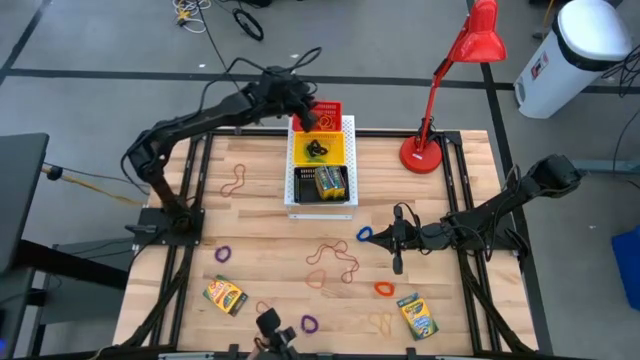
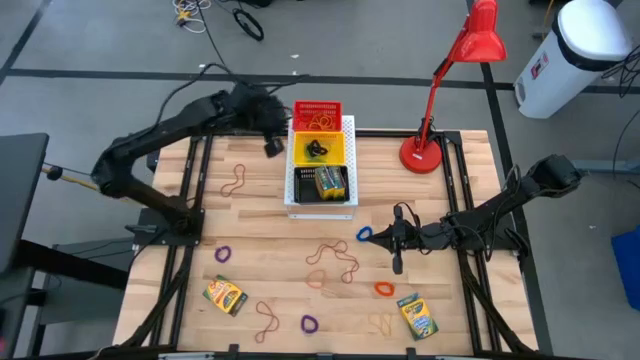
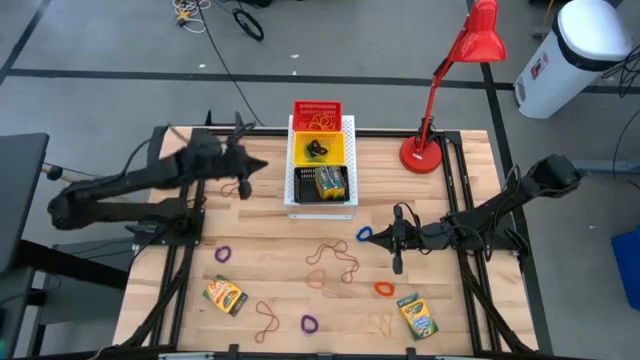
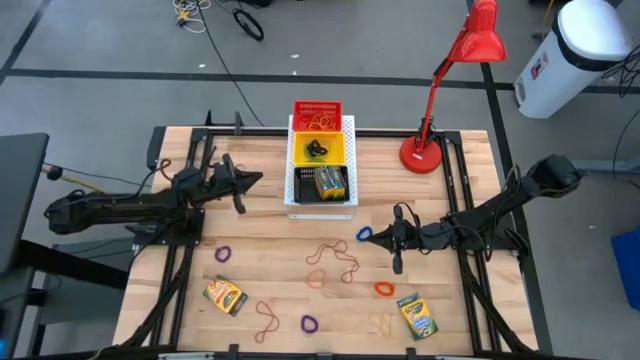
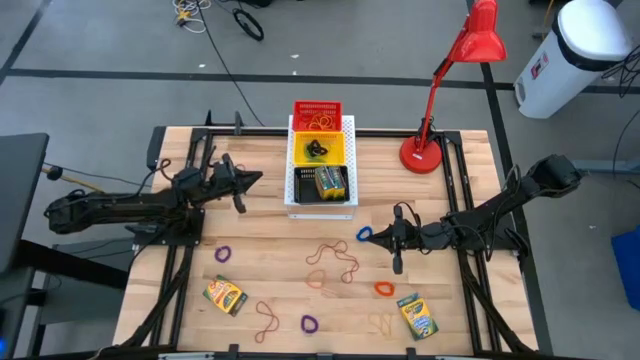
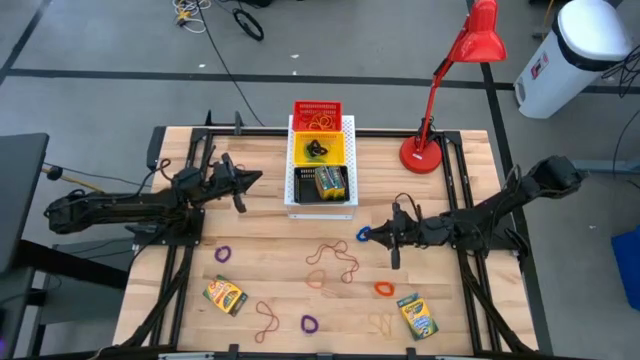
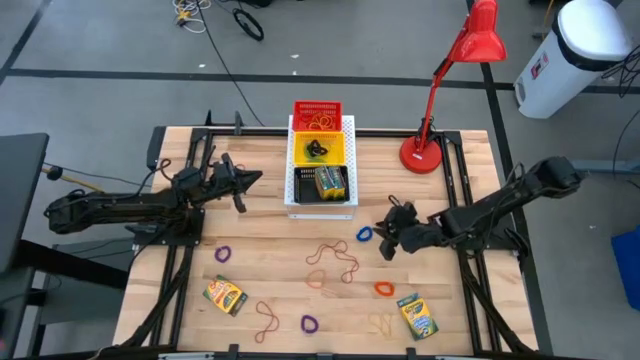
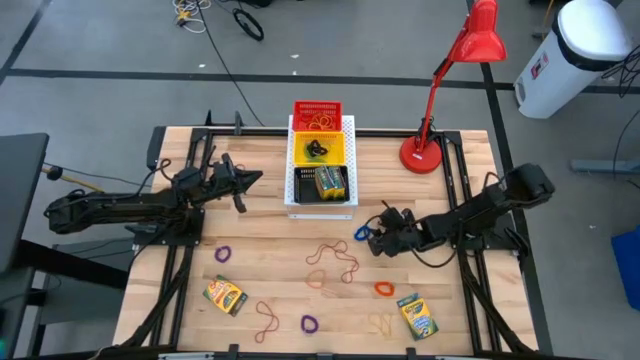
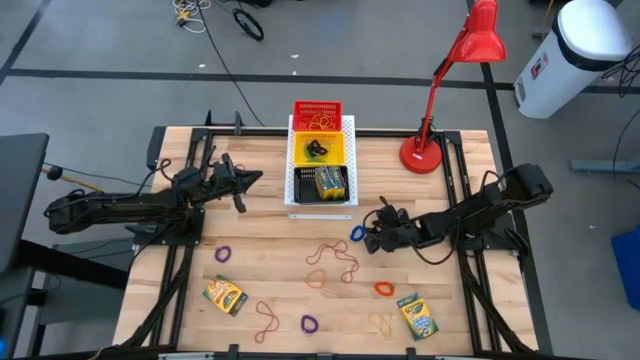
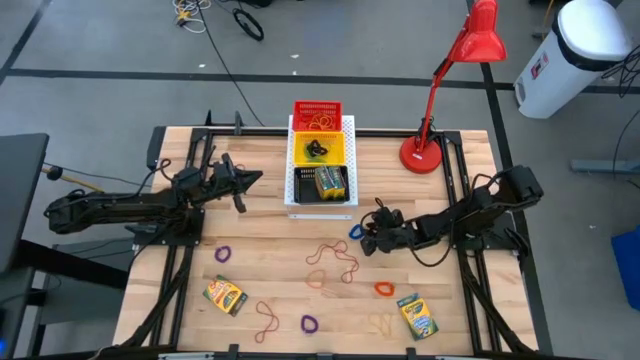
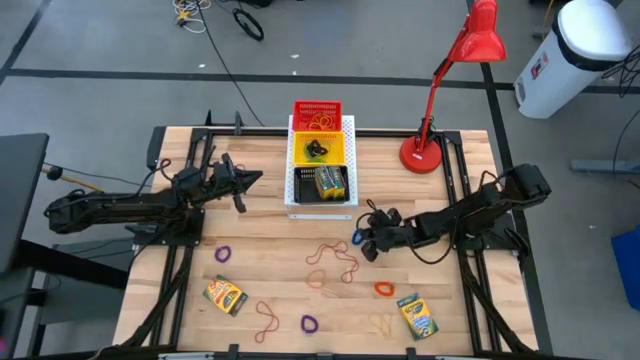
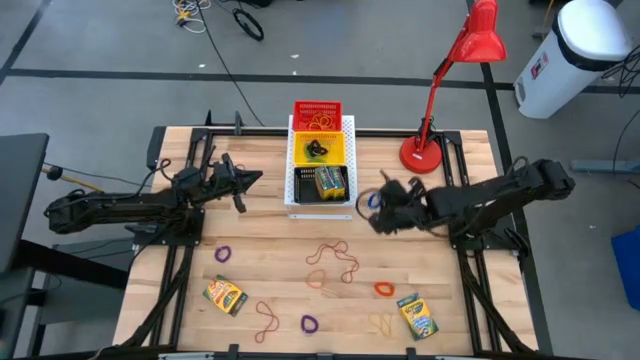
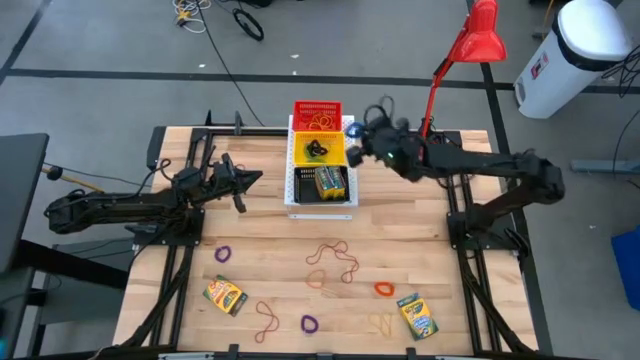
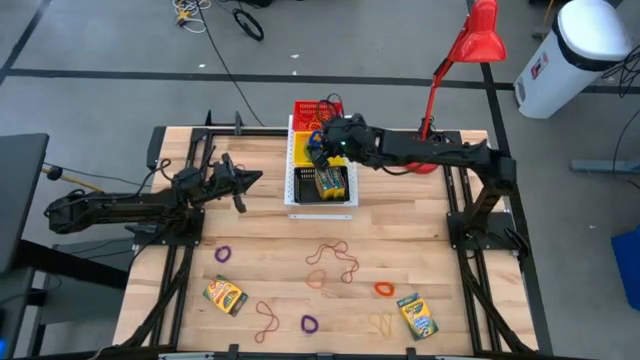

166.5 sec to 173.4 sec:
Task: Pick & Place Office Desk Supplies
Put the blue spring keychain into the yellow bin on the shelf

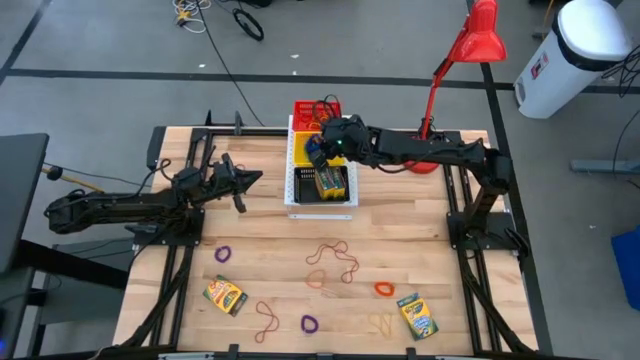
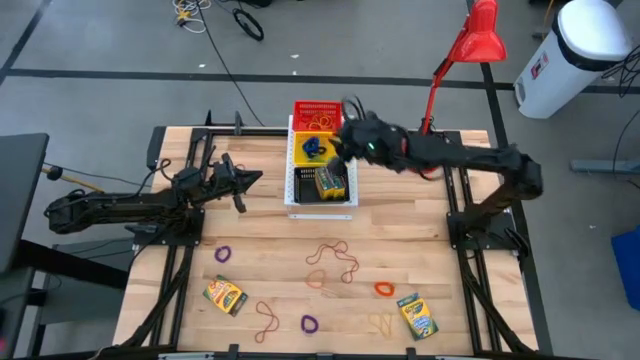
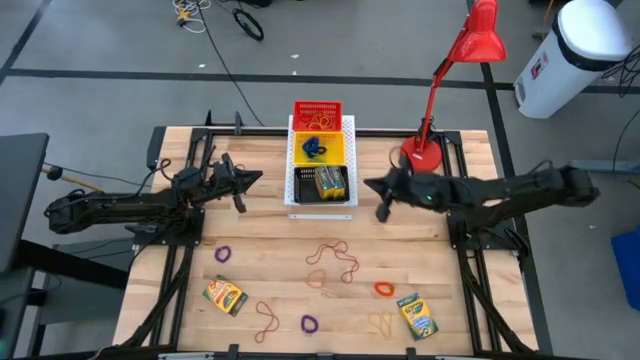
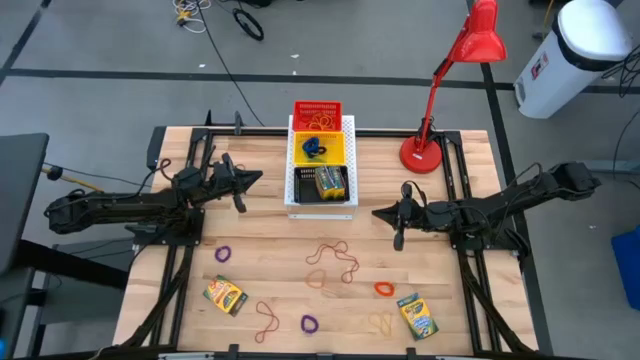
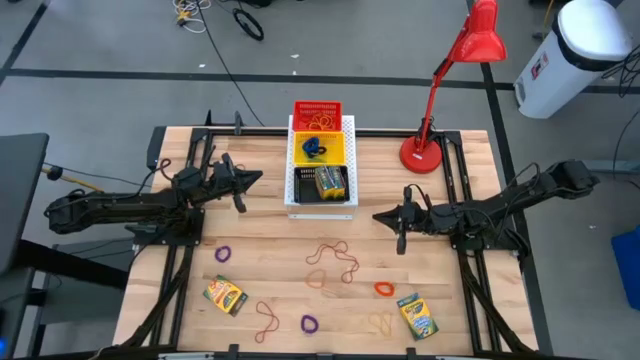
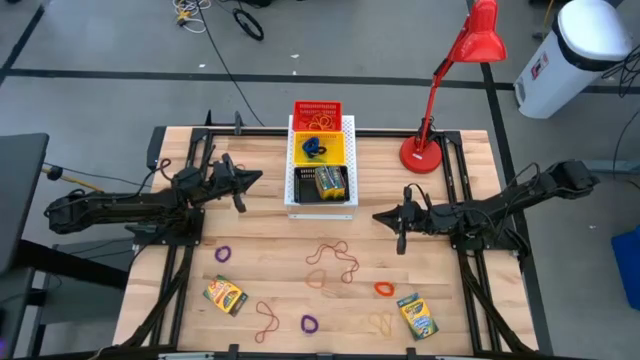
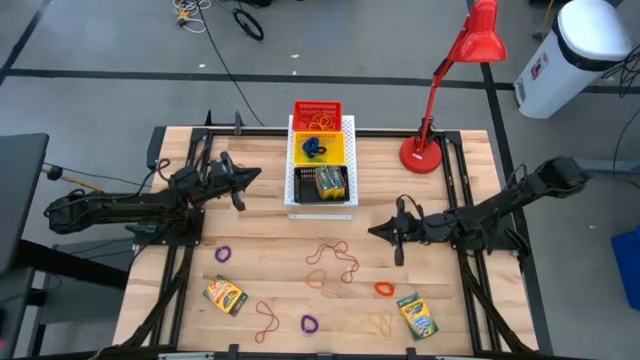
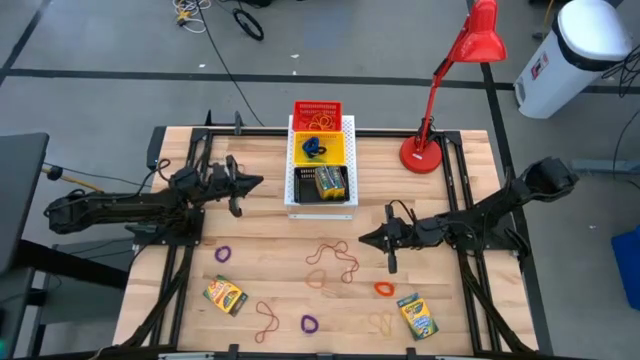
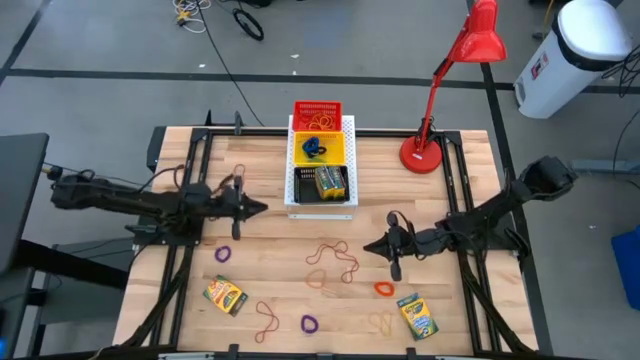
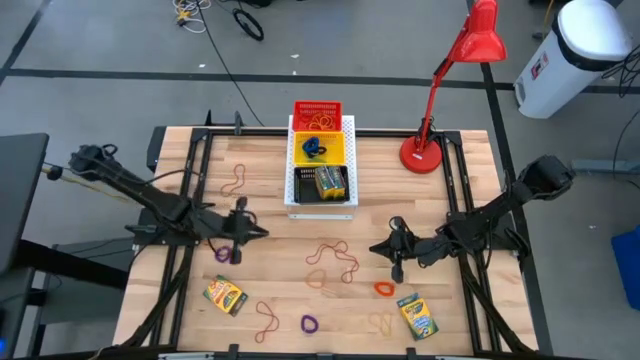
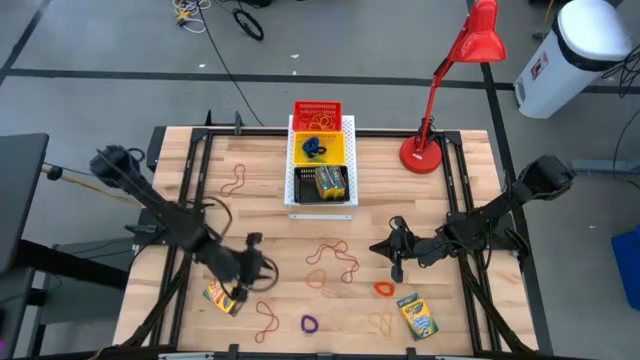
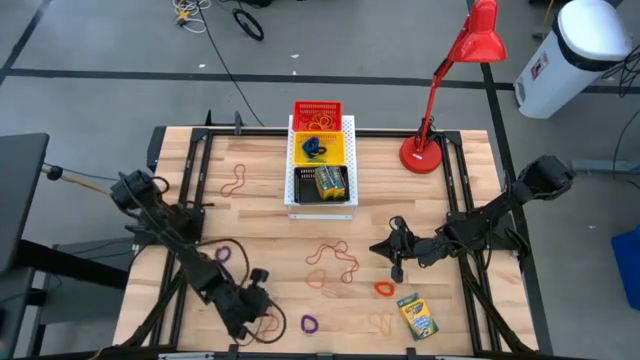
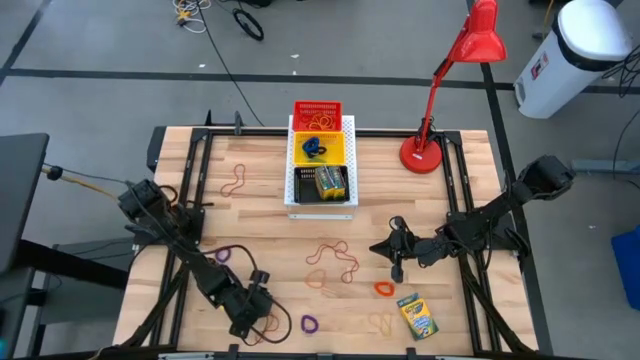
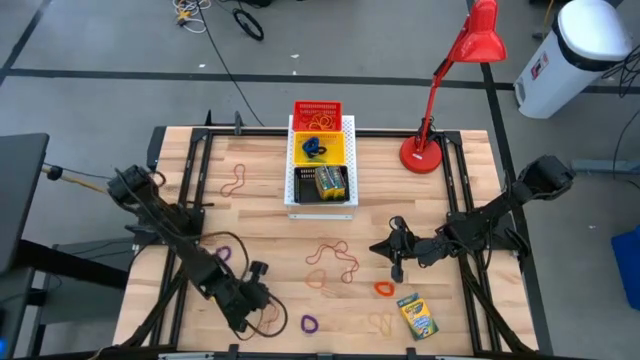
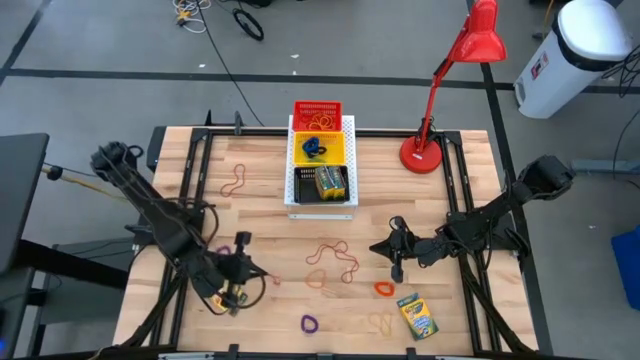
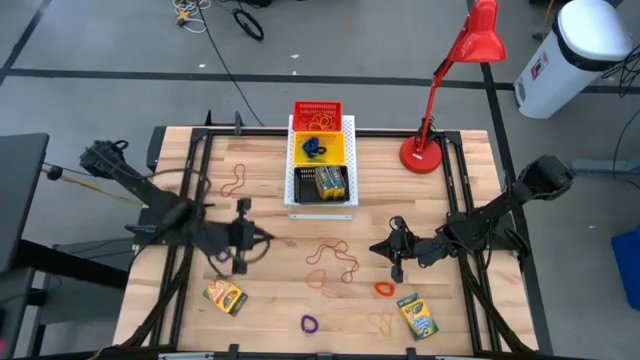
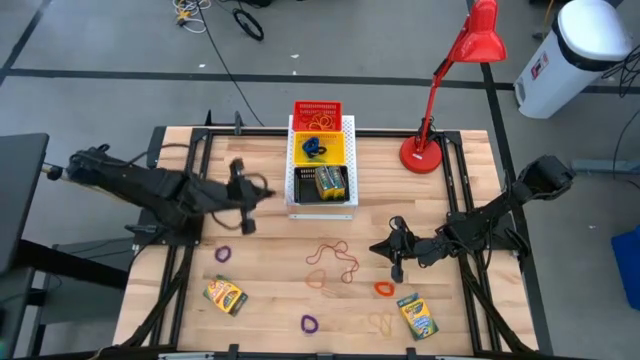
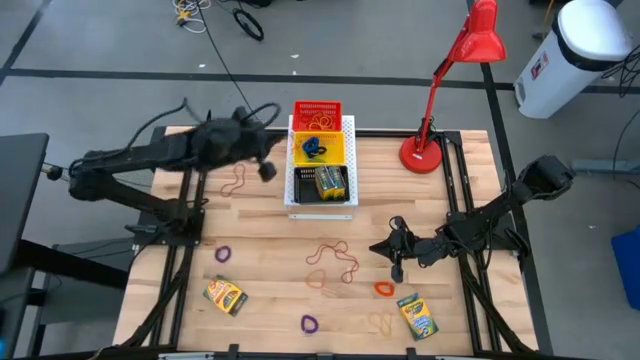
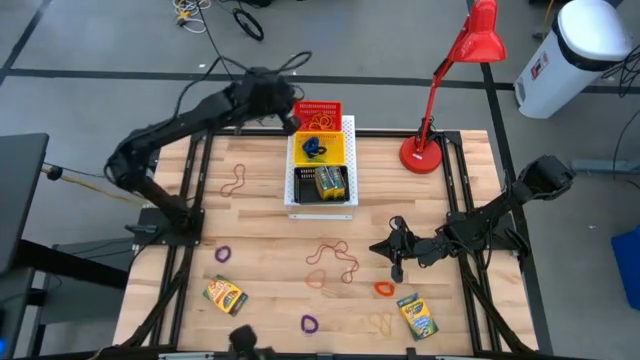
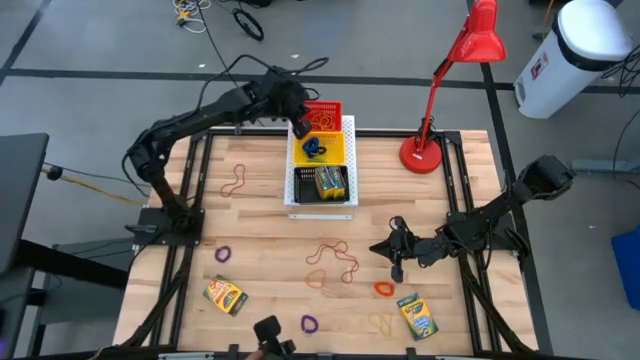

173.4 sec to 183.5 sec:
Put the red rubber band into the red bin on the shelf

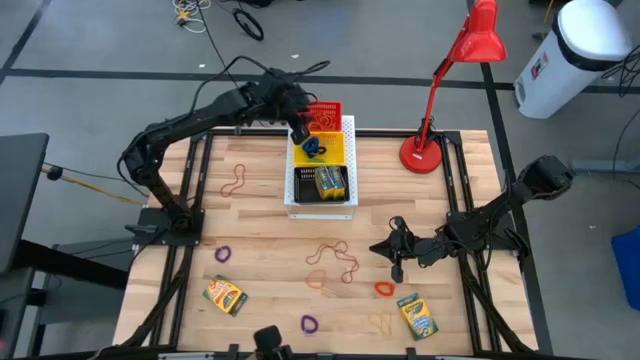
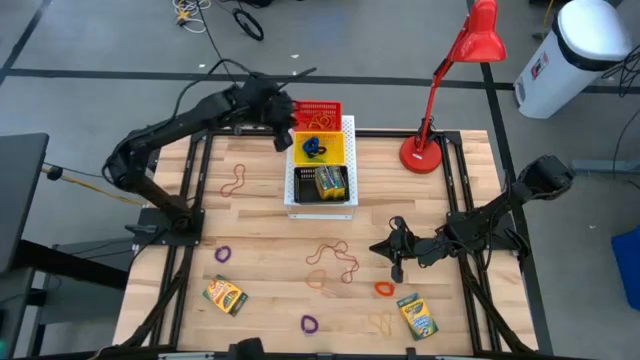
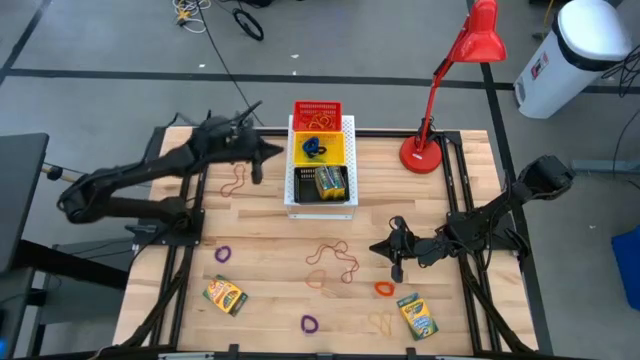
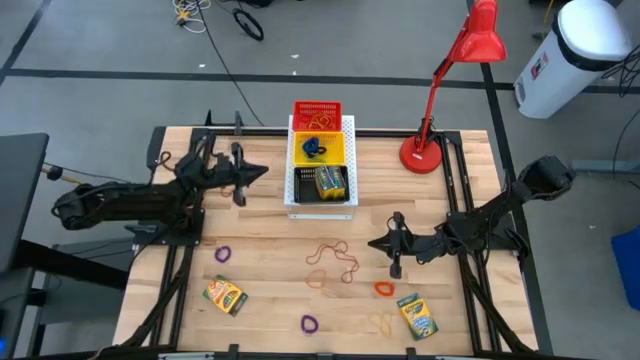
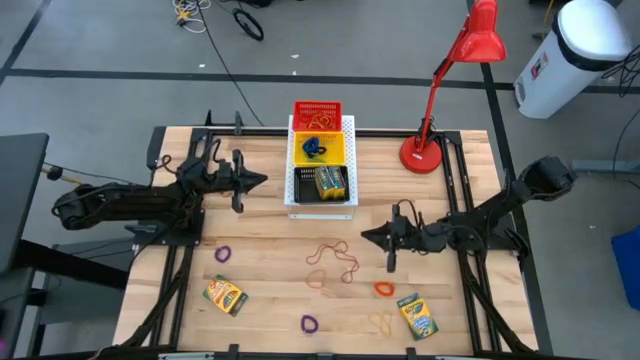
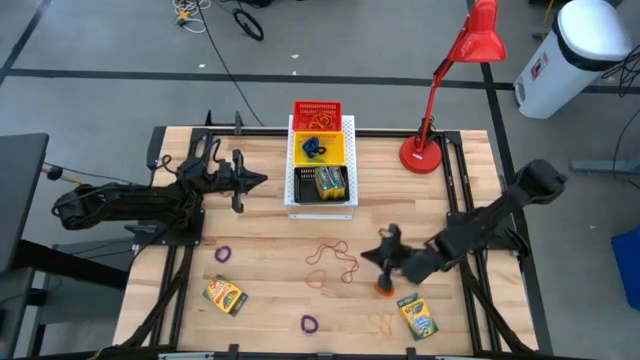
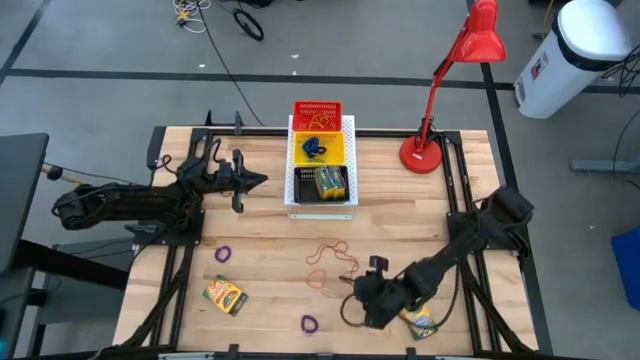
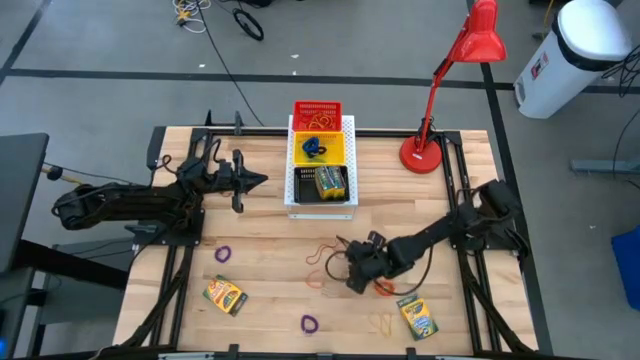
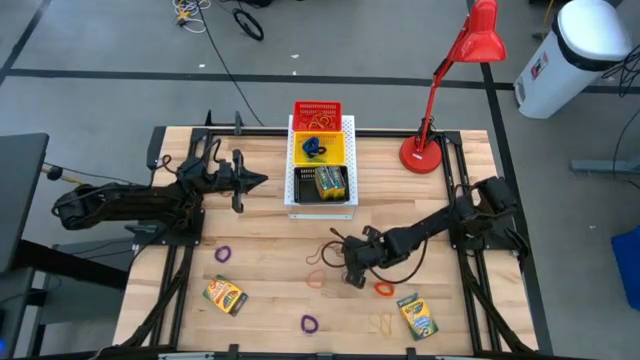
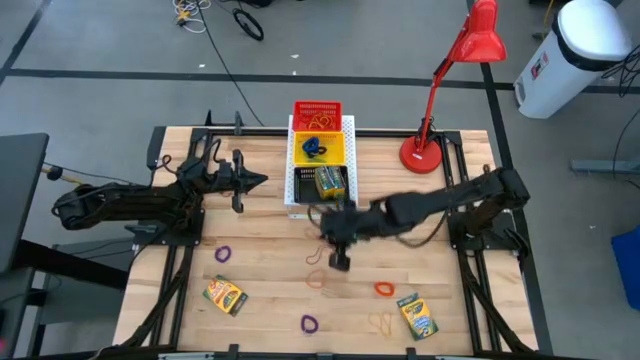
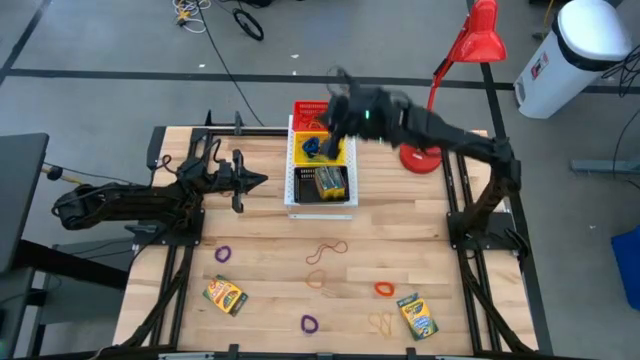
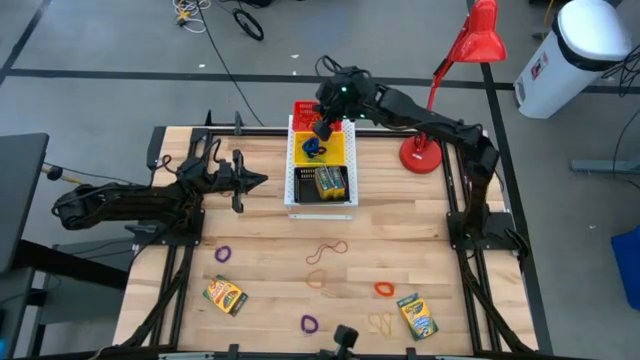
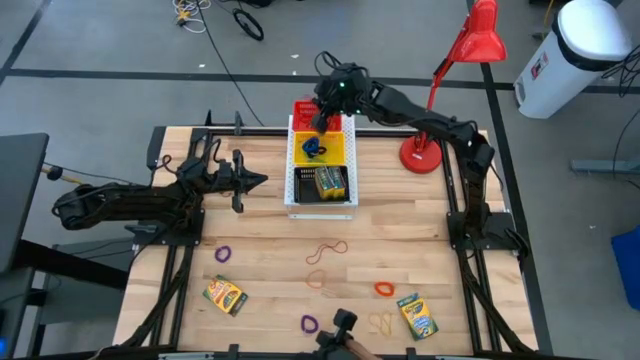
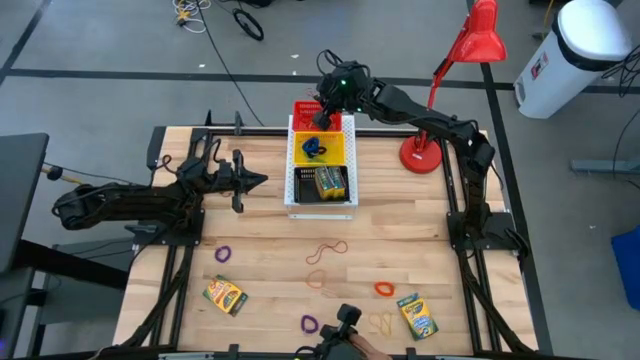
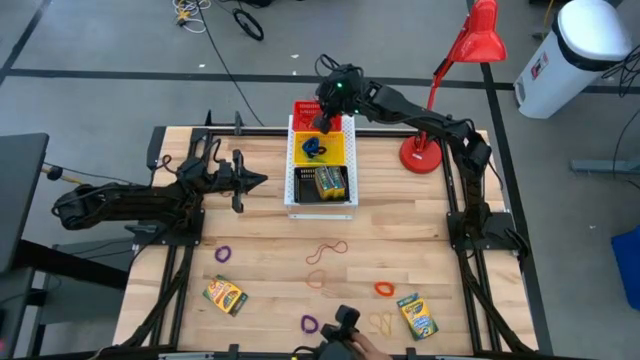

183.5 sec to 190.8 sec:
Put the red rubber band into the red bin on the shelf
